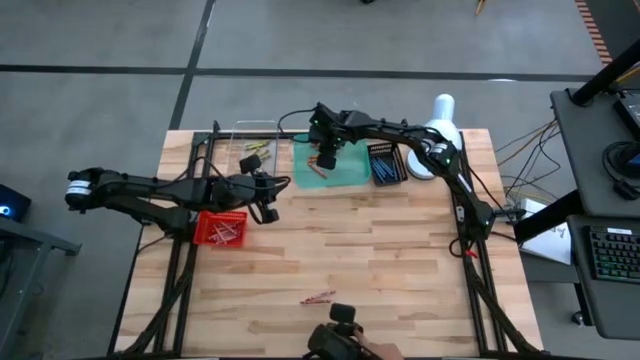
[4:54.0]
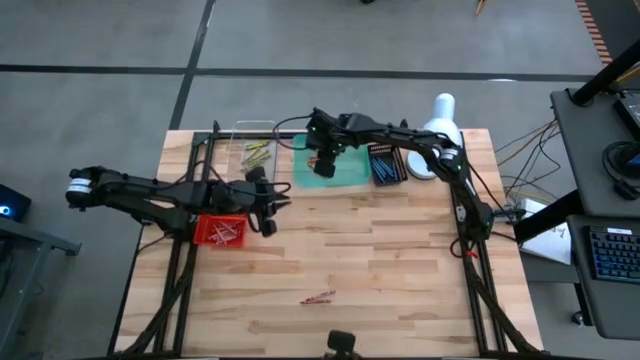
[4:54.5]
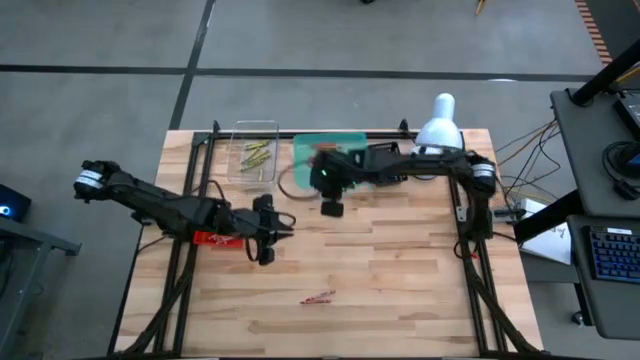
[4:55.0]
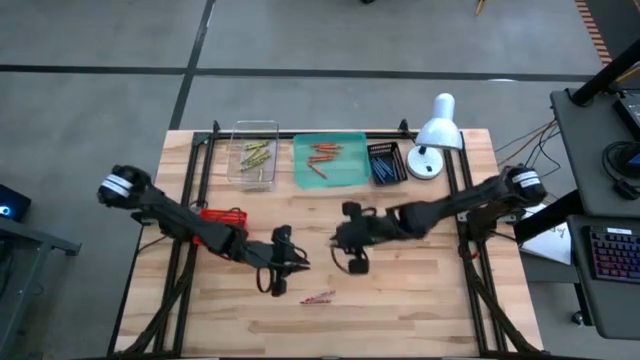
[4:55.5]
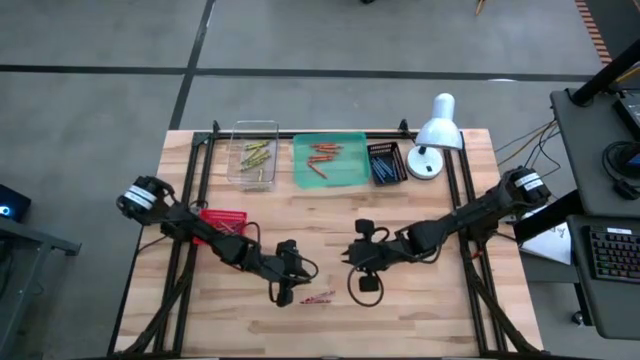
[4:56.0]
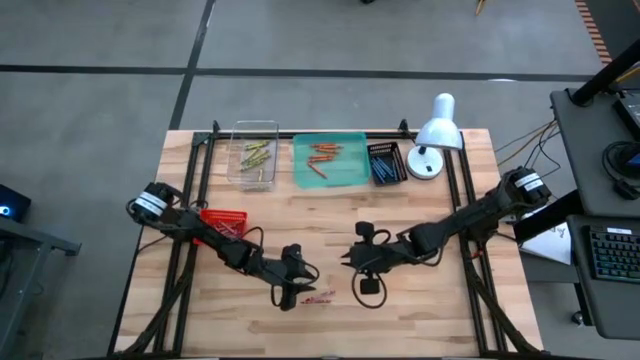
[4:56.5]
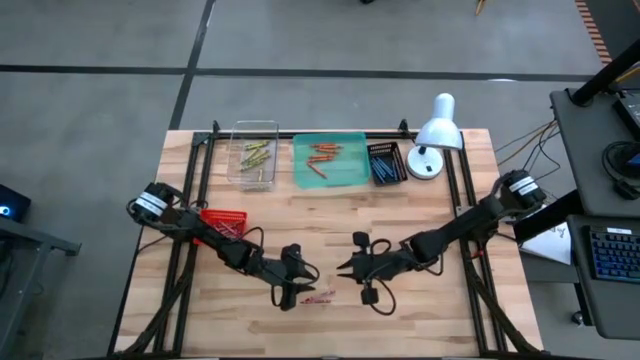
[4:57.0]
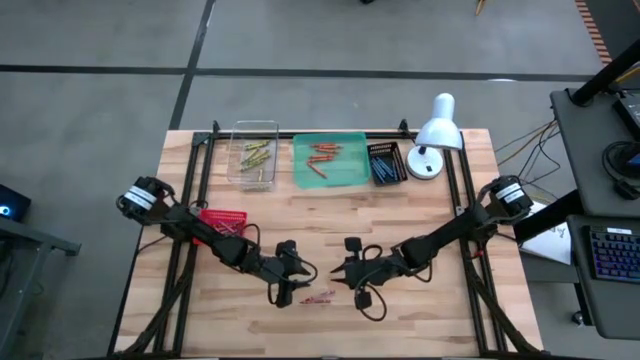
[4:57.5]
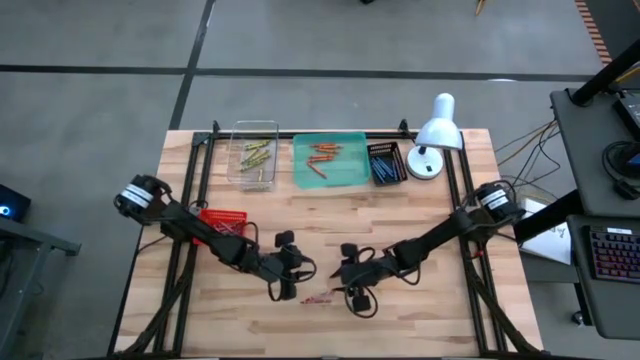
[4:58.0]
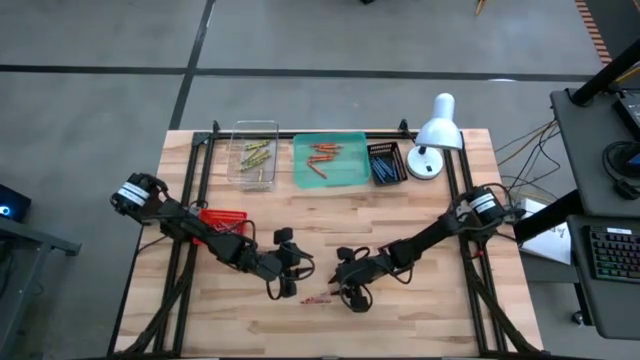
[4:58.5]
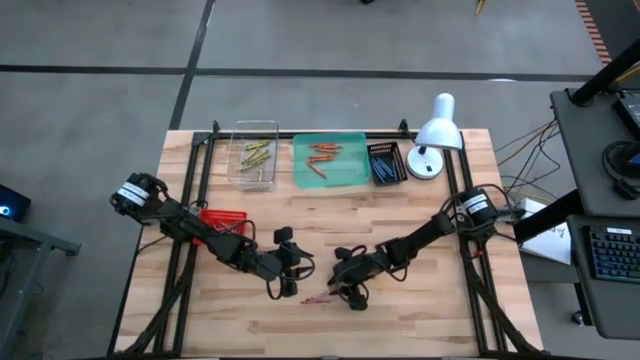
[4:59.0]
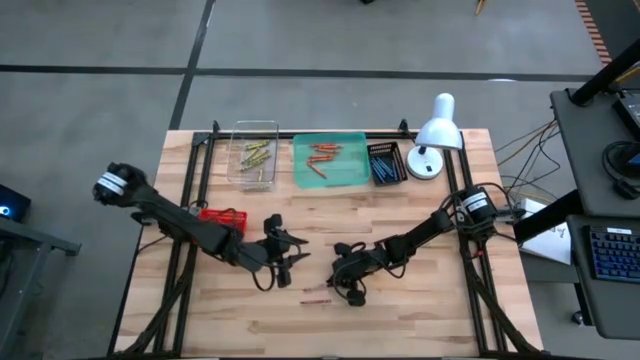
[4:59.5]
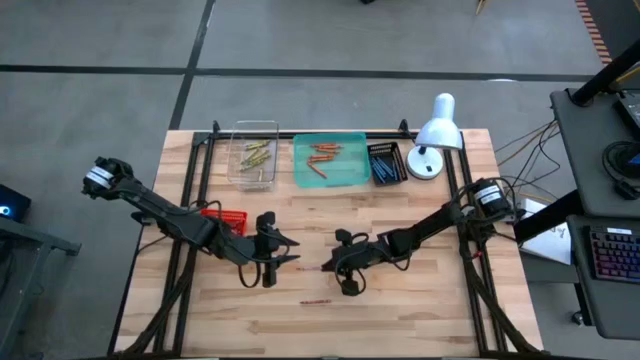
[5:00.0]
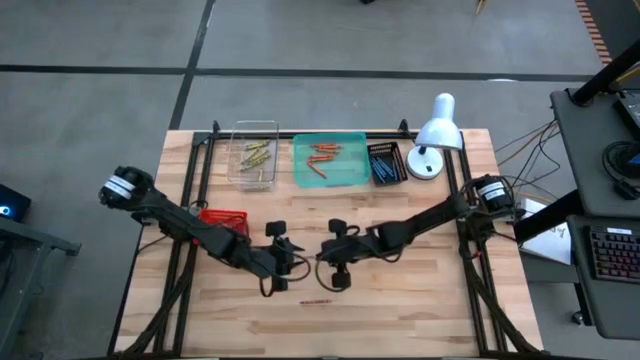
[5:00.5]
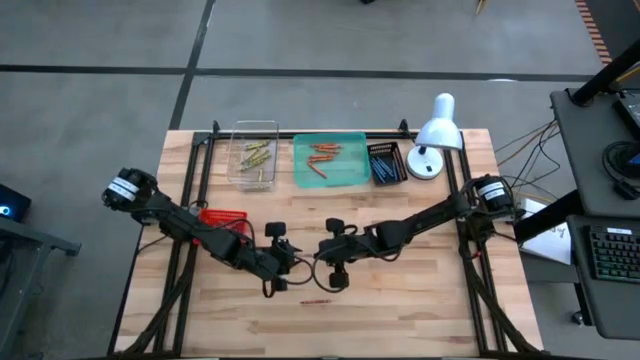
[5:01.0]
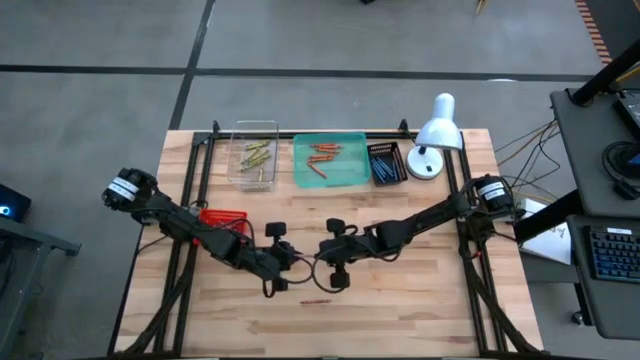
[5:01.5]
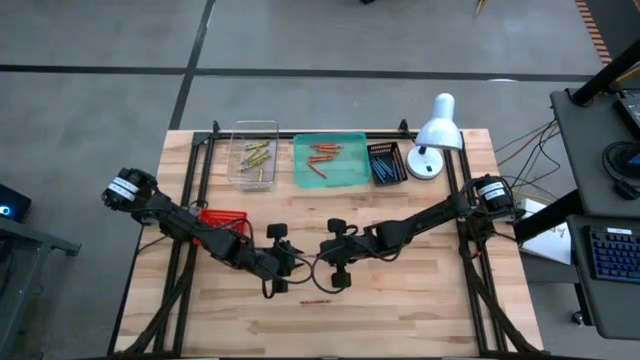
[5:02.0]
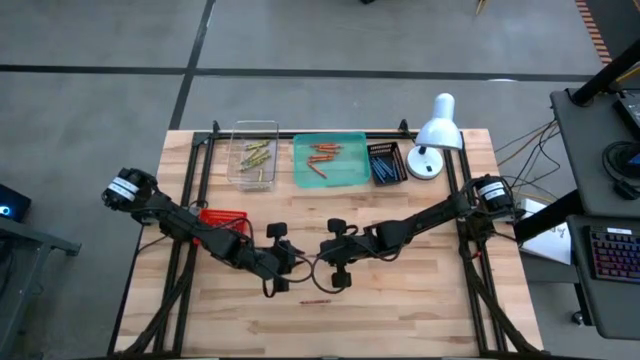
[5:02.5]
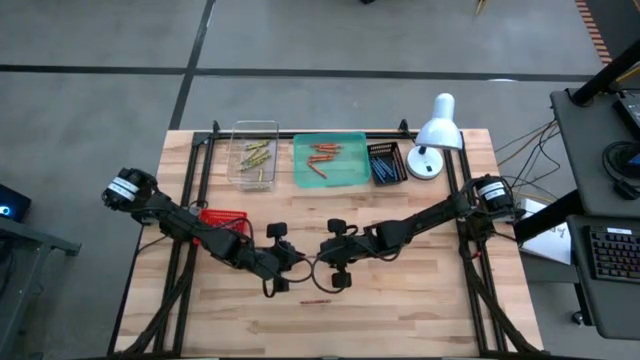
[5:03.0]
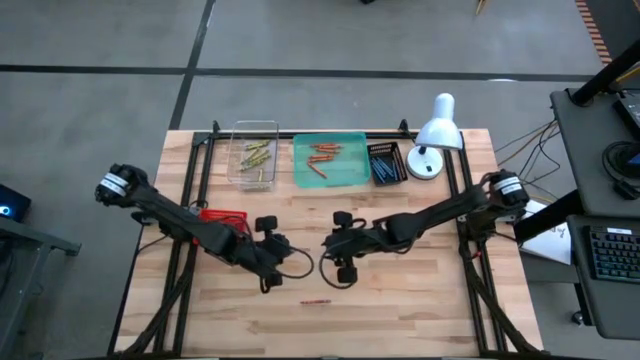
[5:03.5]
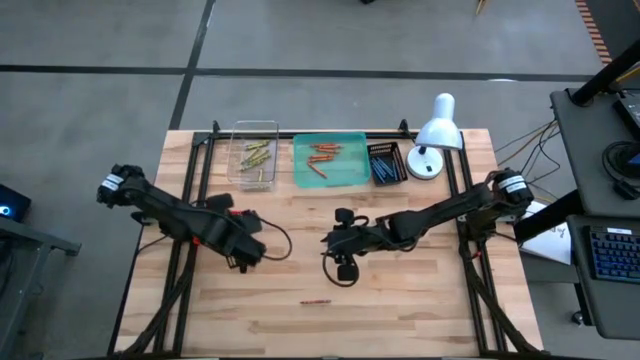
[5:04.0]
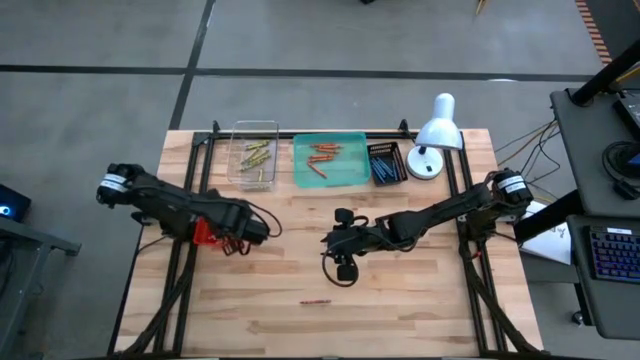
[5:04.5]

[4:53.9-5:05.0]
Task: Sort crayons
Put the red crayon into the red bin

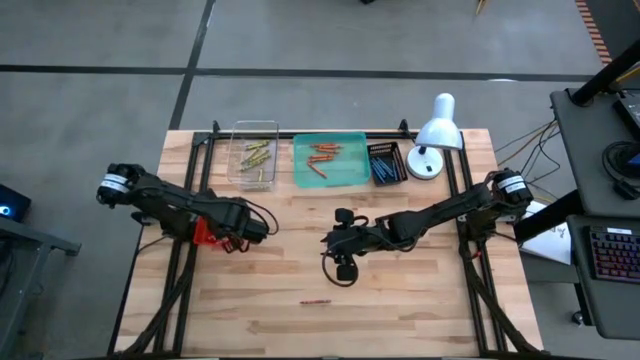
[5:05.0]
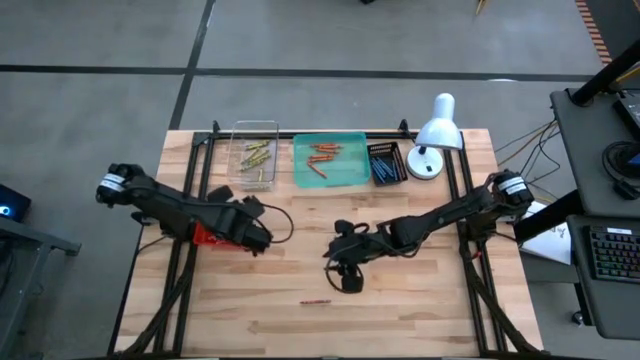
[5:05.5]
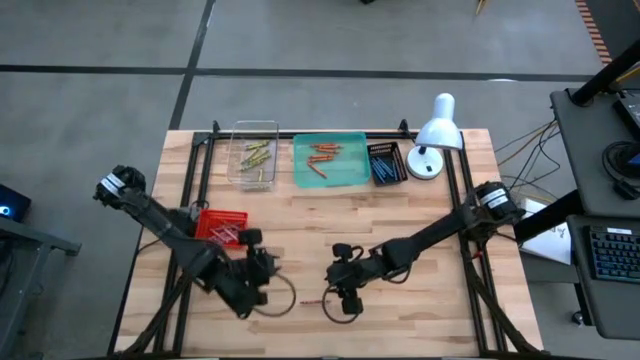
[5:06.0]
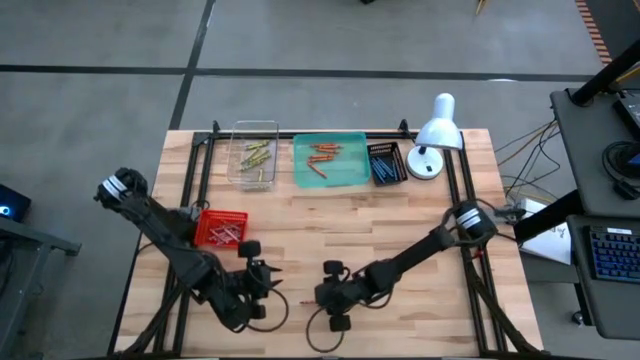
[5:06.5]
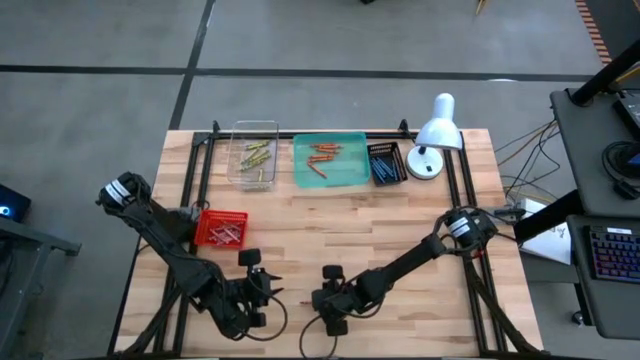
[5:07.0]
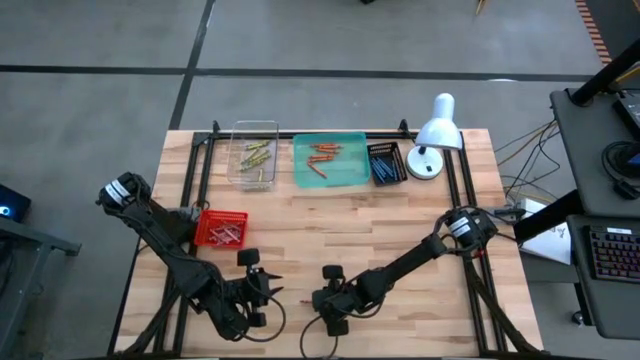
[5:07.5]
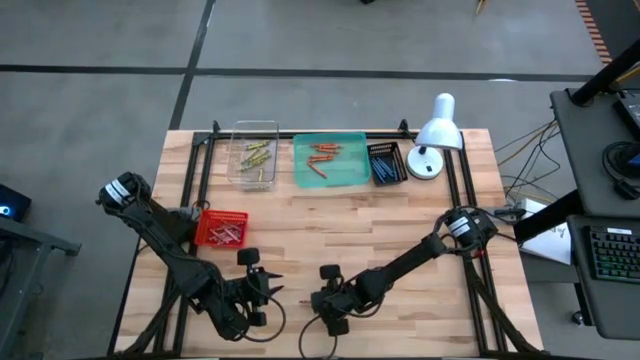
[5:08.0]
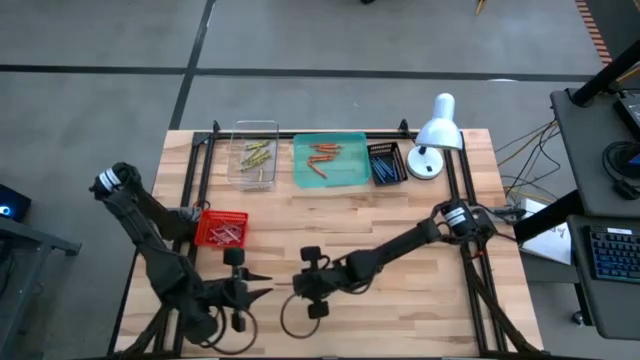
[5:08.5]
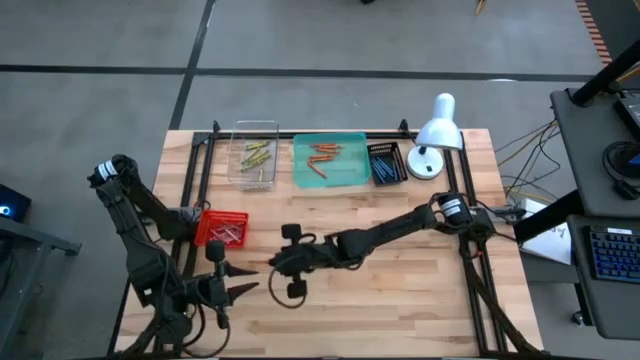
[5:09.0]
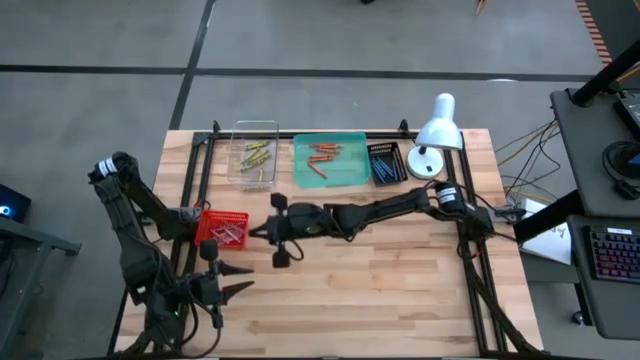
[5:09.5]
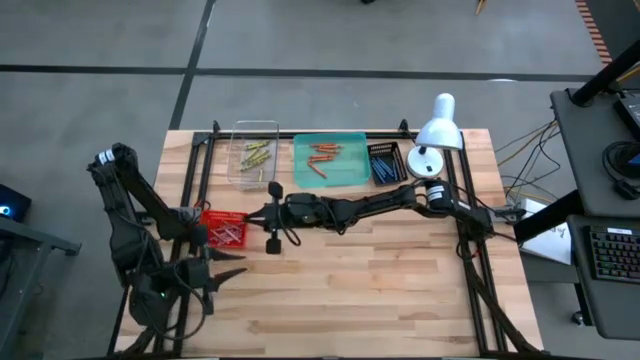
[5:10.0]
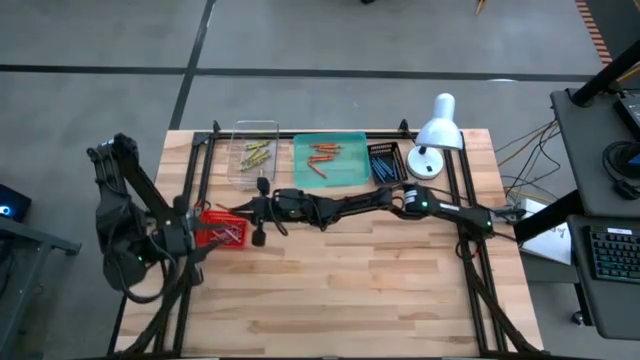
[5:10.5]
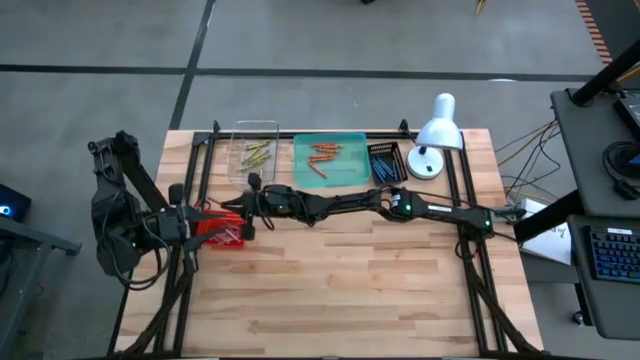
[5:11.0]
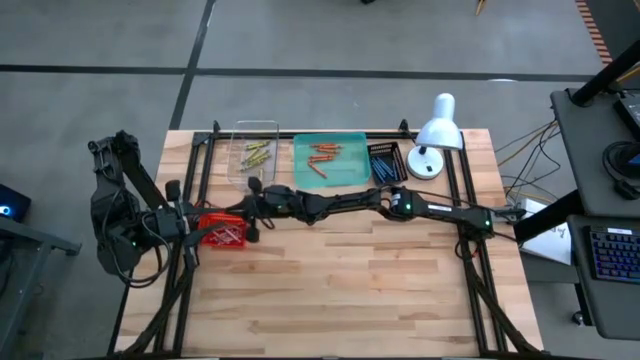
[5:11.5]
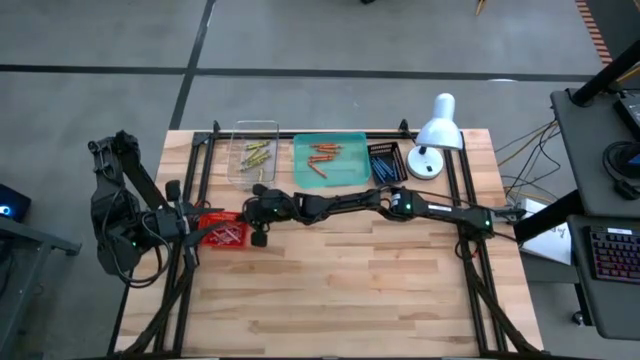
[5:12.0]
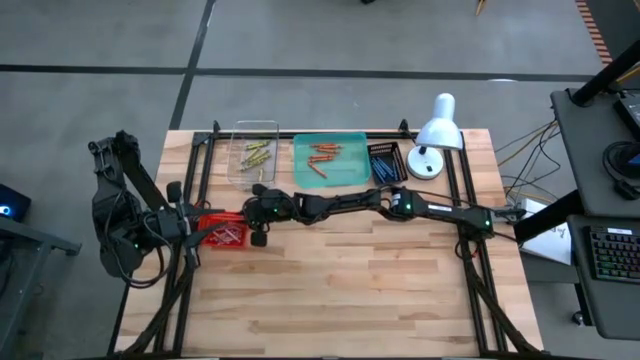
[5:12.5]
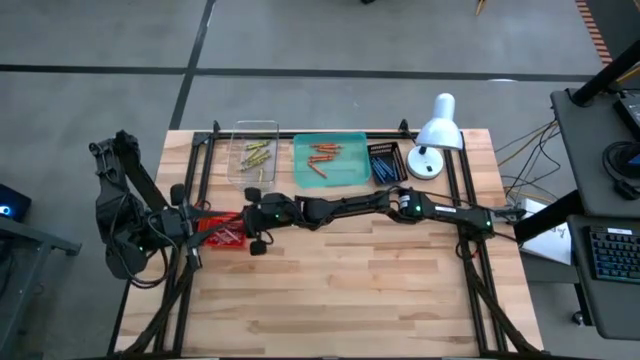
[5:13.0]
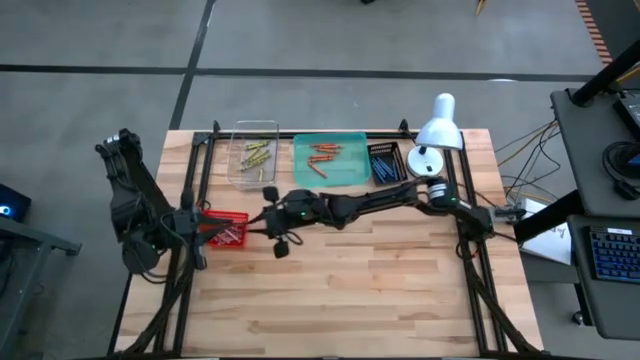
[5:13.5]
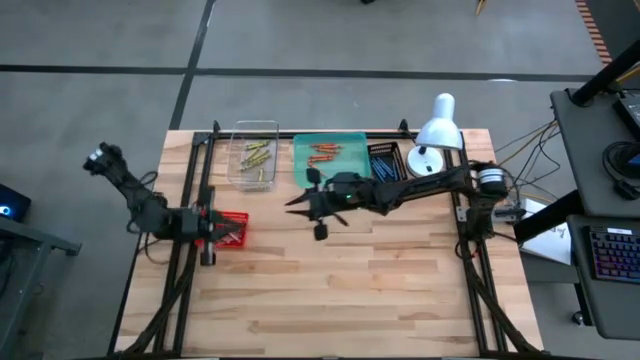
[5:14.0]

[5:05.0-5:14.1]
Put the red crayon into the red bin
